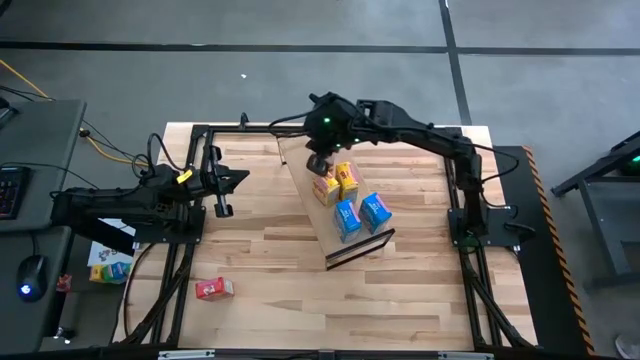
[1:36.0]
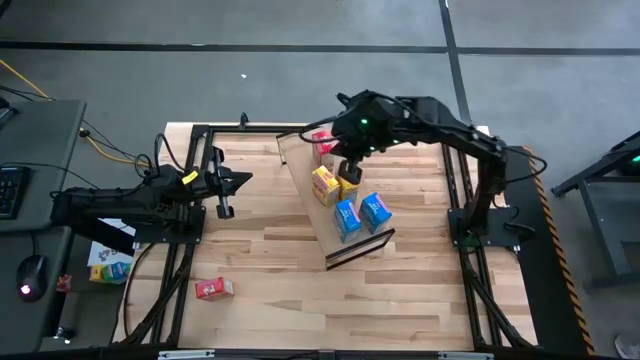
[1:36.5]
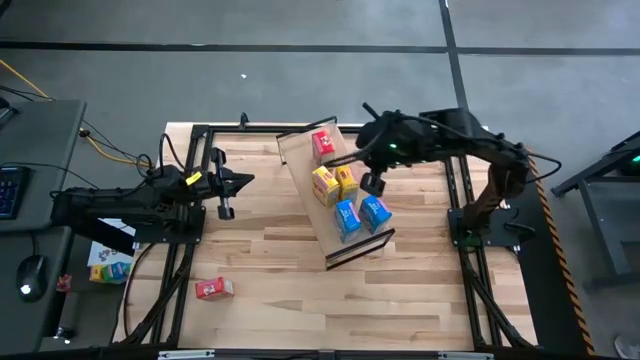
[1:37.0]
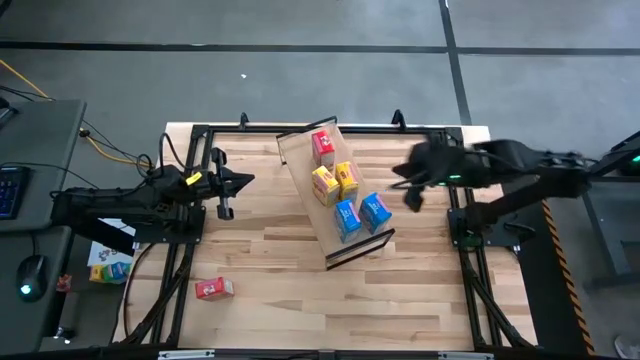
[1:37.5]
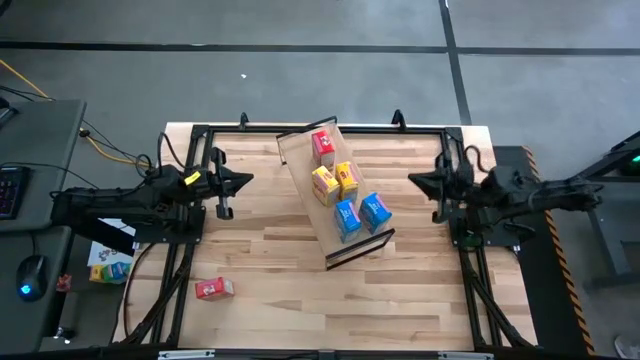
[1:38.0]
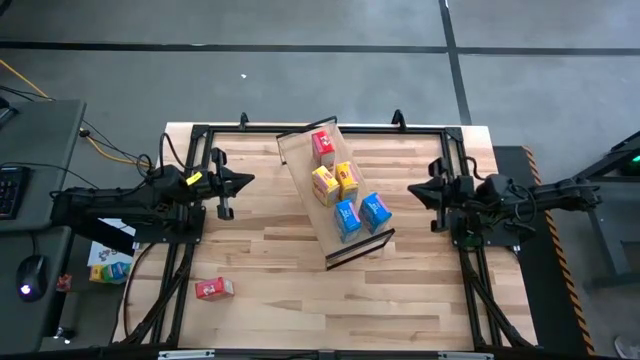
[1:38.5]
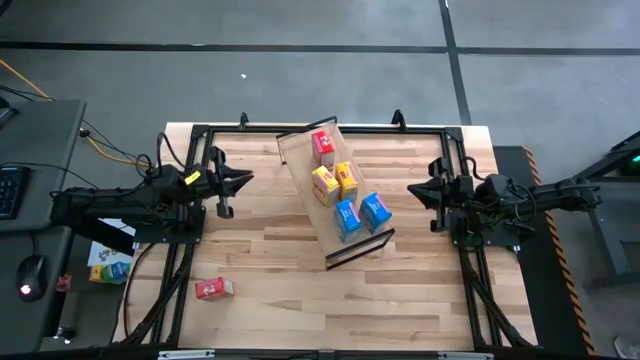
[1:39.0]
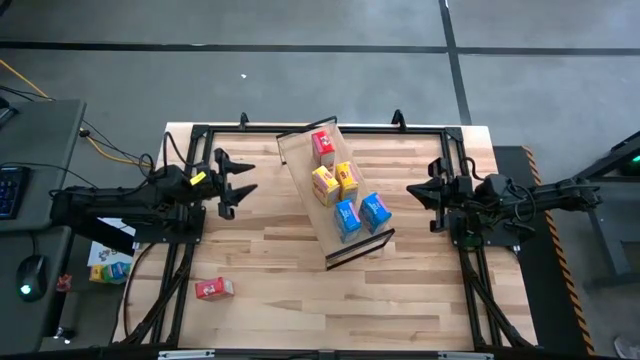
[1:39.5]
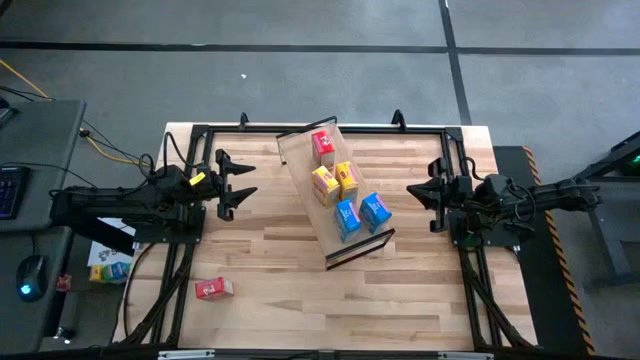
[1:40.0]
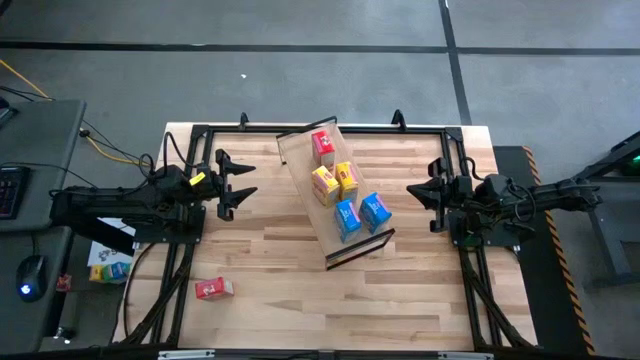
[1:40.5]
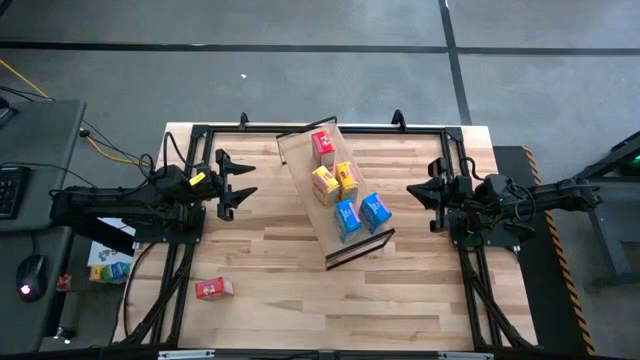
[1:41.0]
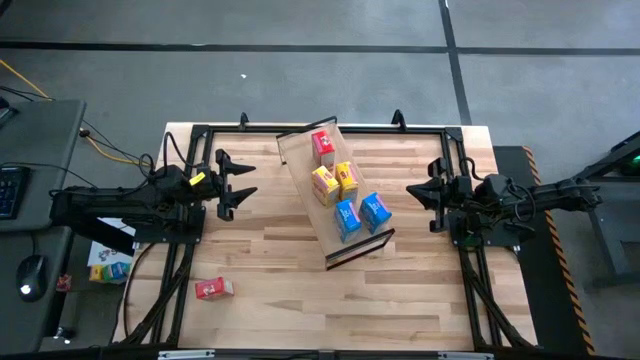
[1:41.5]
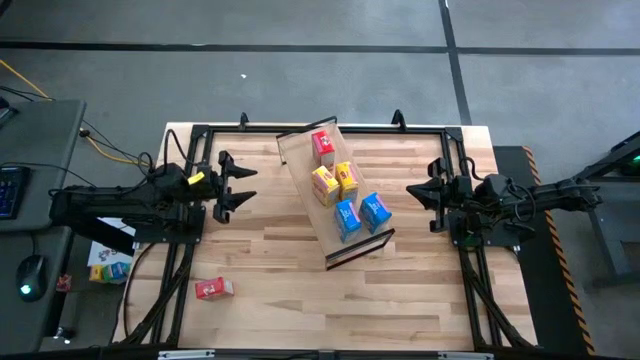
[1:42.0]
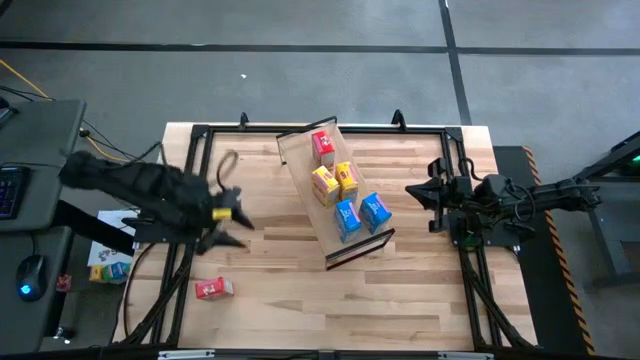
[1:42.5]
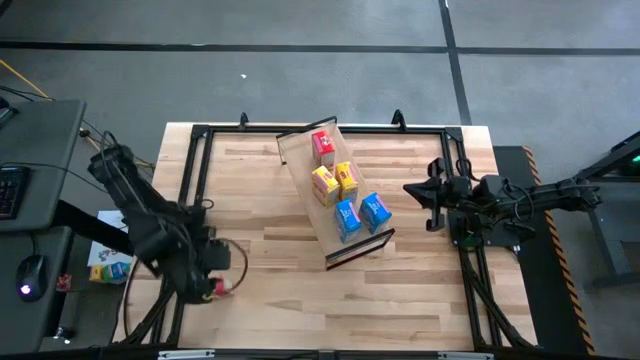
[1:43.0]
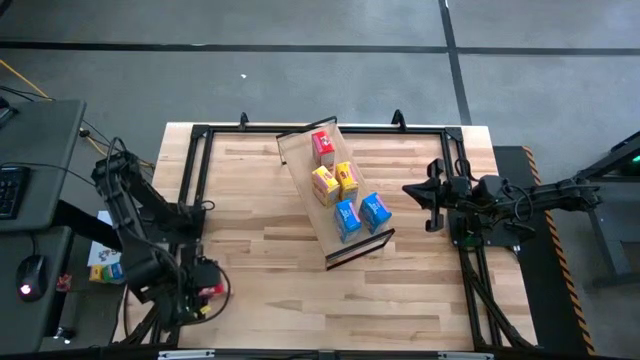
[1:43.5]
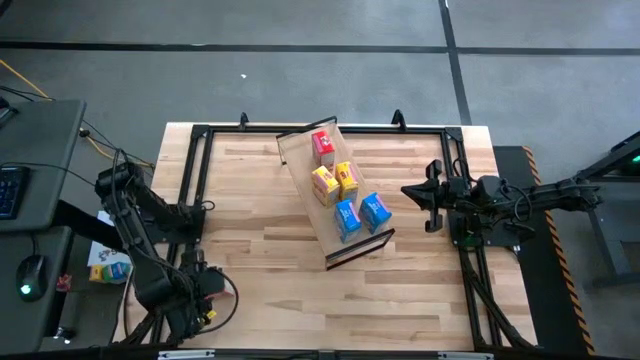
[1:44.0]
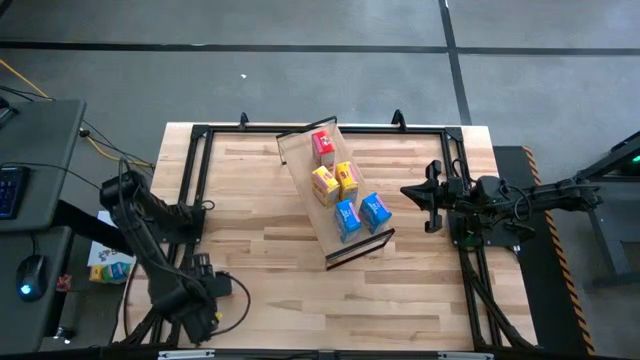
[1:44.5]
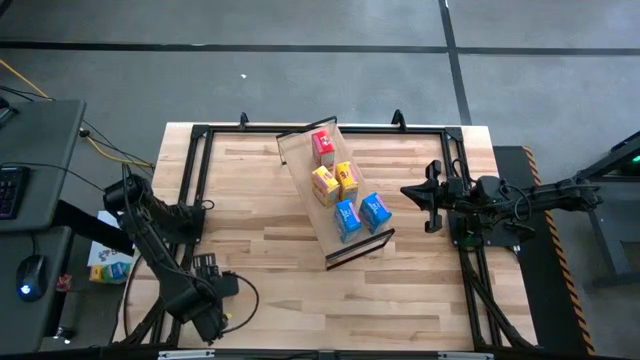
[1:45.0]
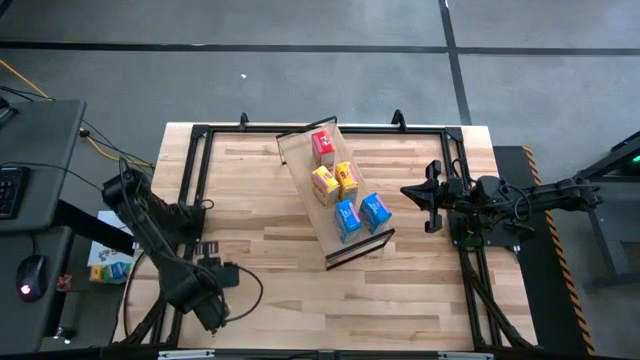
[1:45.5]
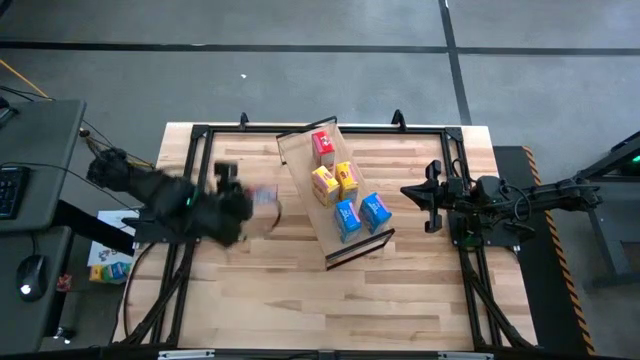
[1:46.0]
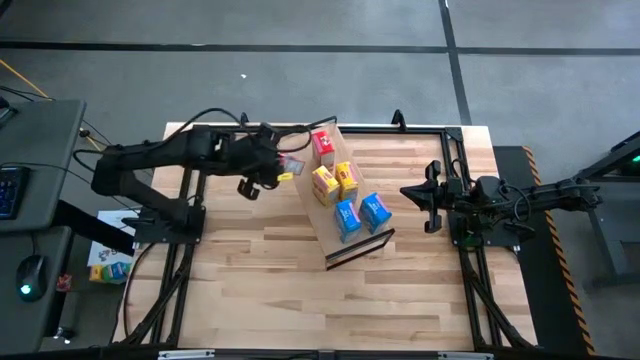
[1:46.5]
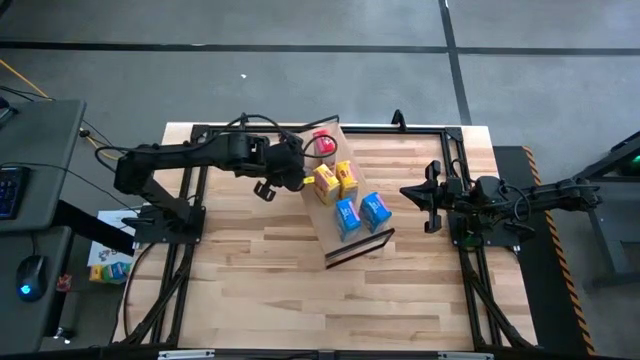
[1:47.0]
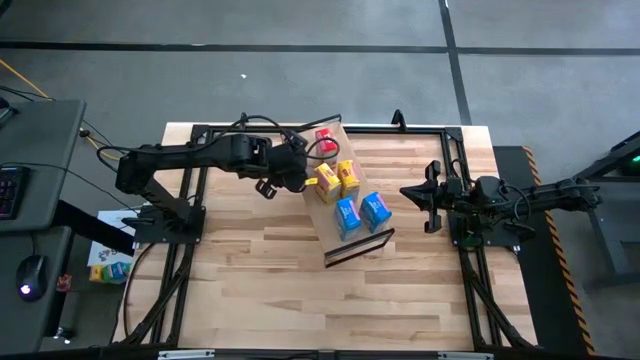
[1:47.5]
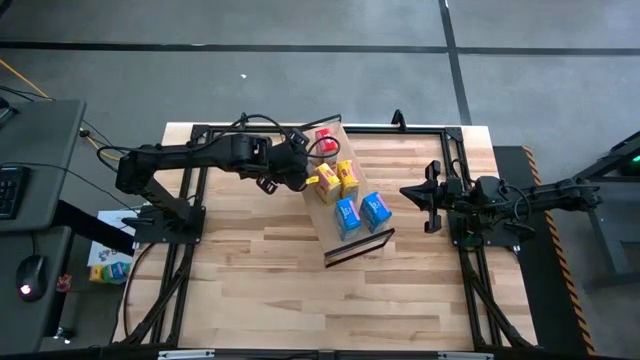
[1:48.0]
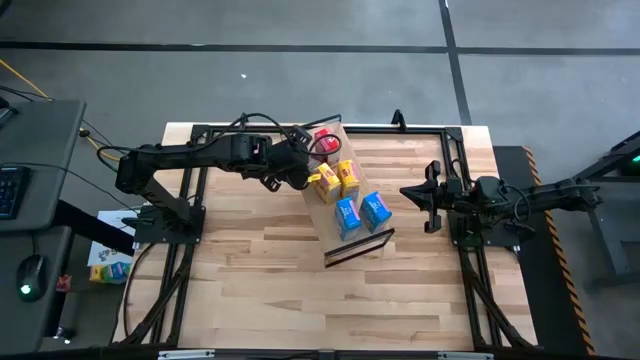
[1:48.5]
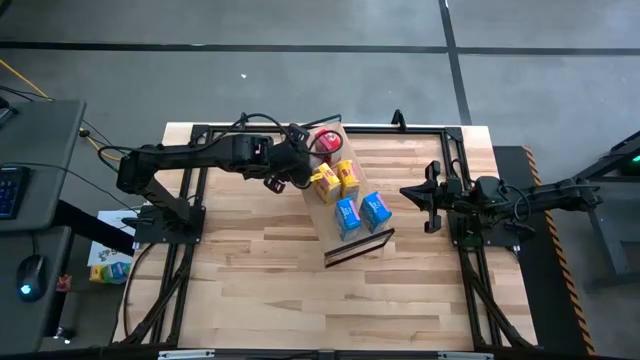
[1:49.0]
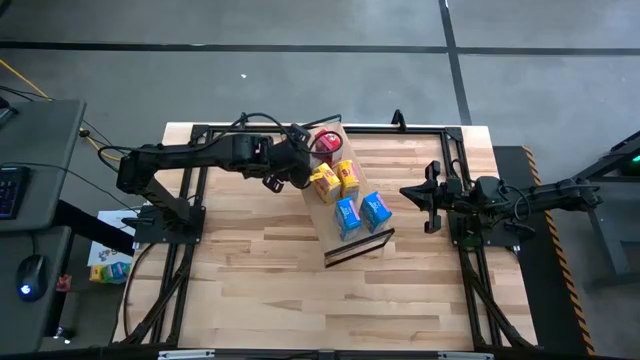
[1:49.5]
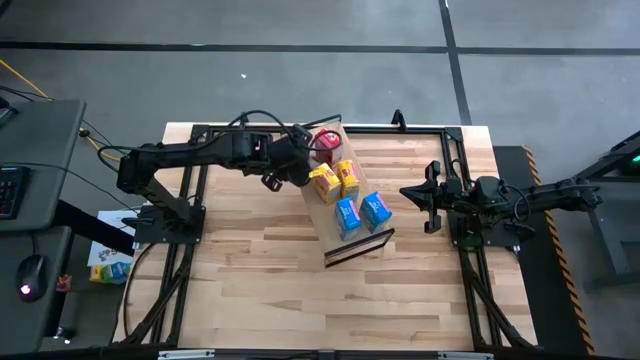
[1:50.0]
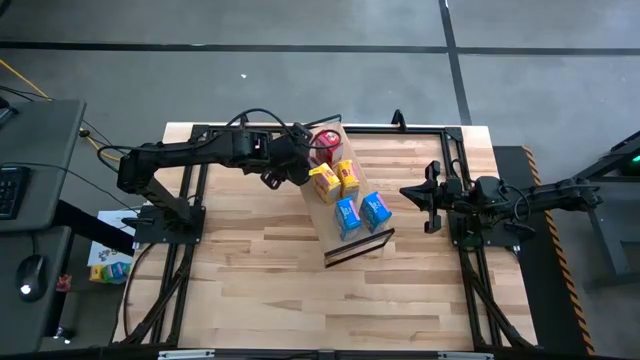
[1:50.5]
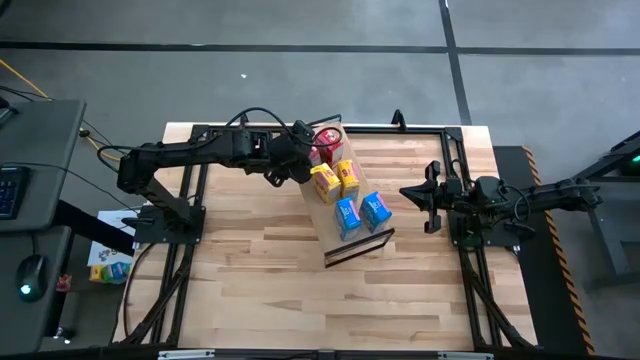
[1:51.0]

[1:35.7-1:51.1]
Task: Stack cereal on shelf
Put the red cereal box on the shelf aligned with the other red cereal box

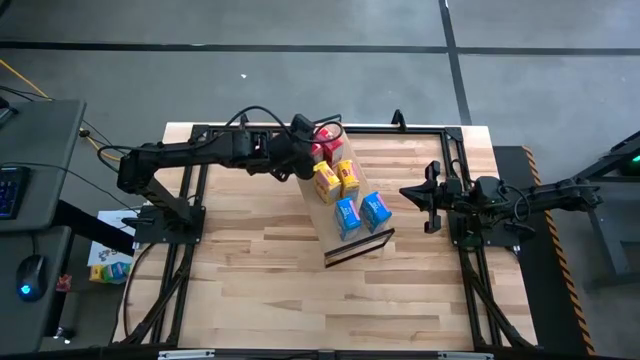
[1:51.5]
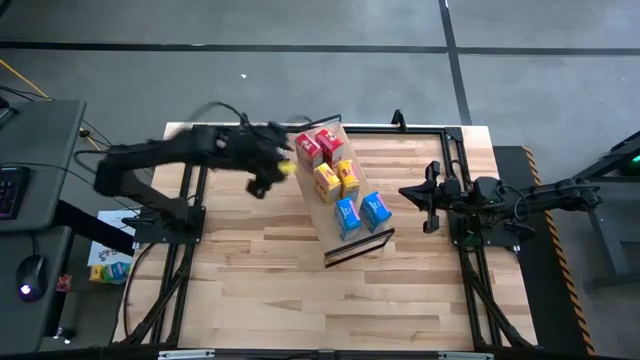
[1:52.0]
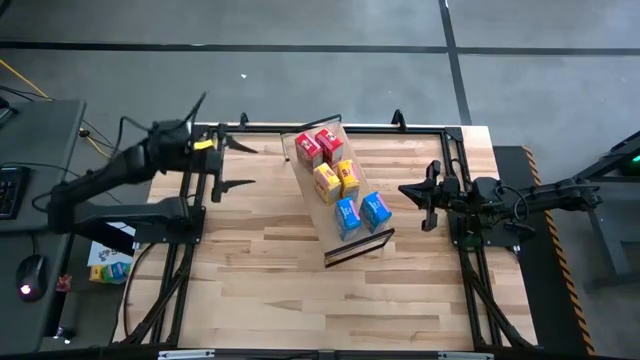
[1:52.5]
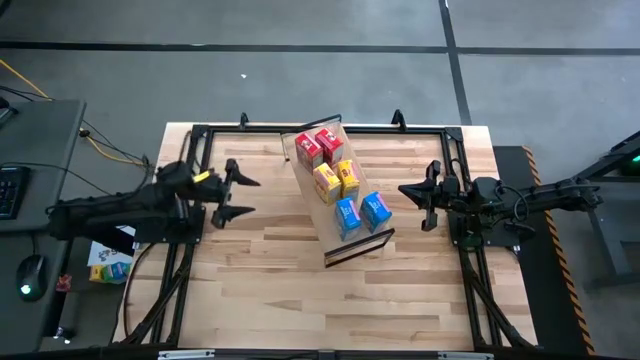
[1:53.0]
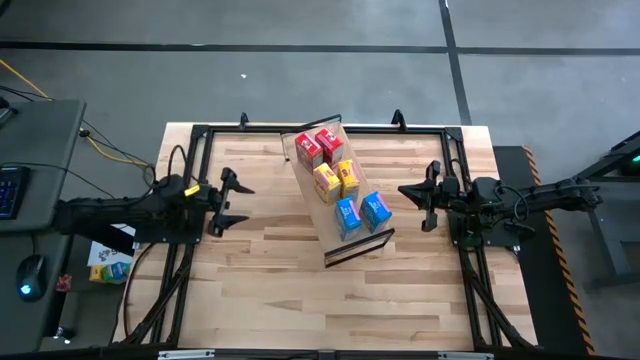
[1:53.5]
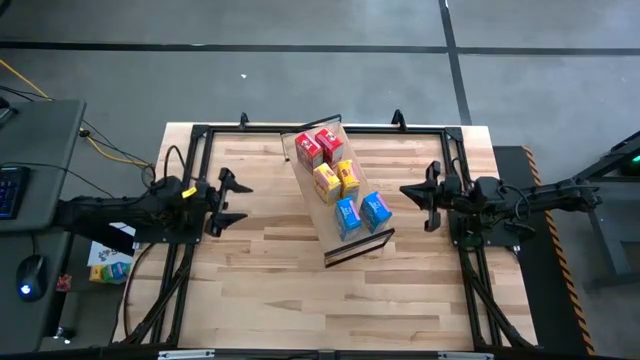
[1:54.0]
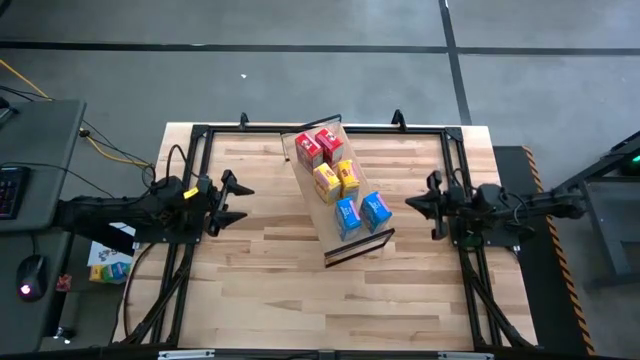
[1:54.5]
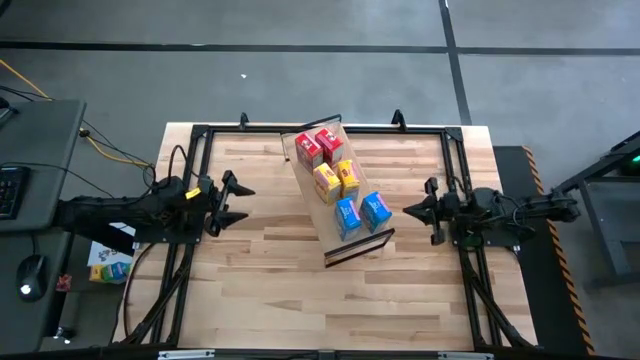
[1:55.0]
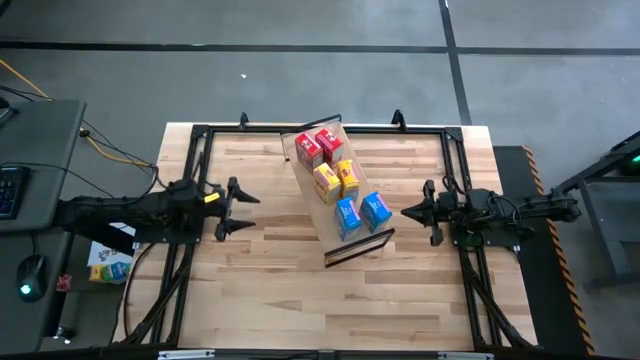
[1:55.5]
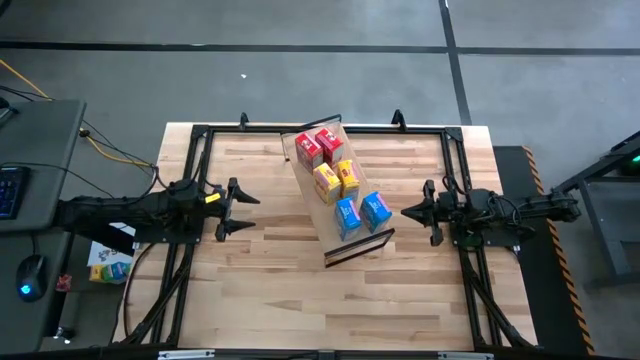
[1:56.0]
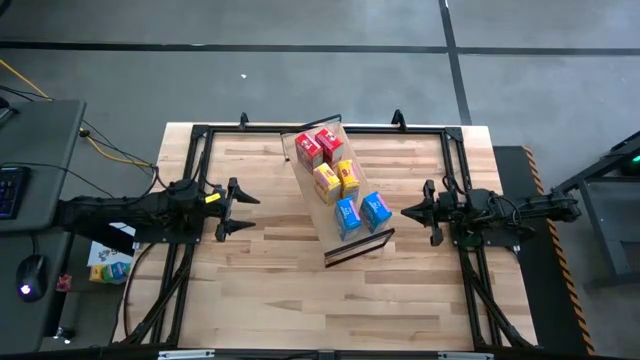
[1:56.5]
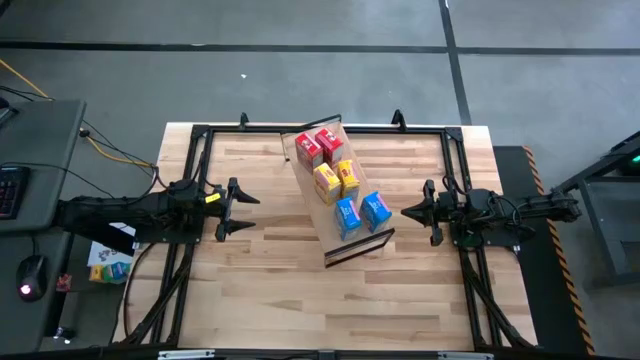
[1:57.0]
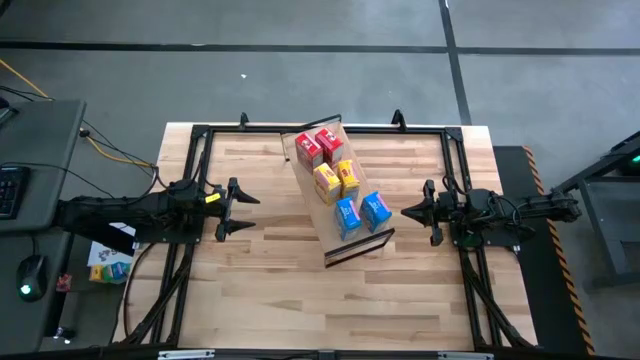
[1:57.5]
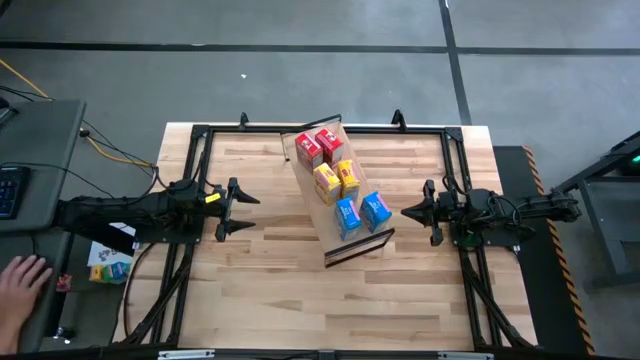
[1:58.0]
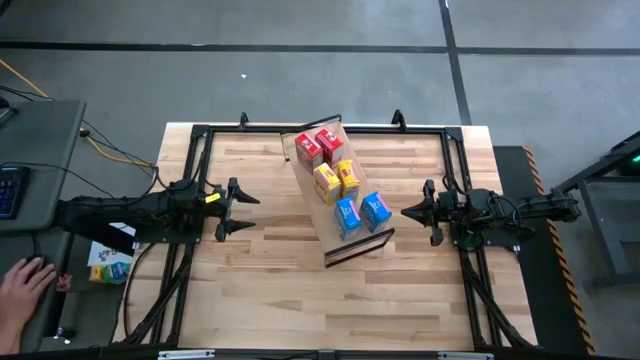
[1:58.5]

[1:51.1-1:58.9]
Return to Home Position
